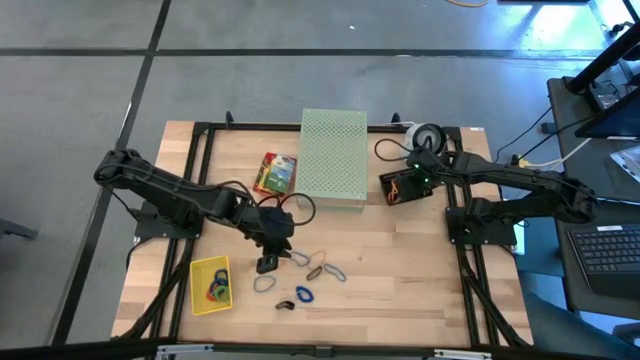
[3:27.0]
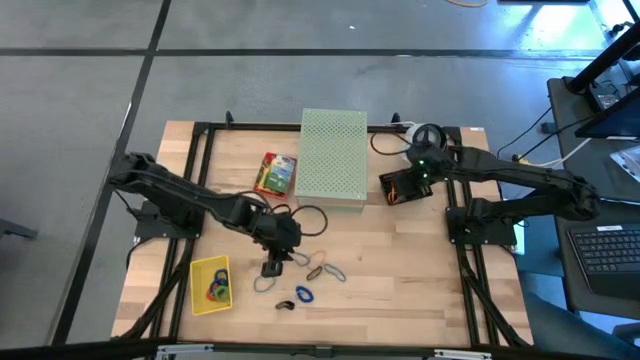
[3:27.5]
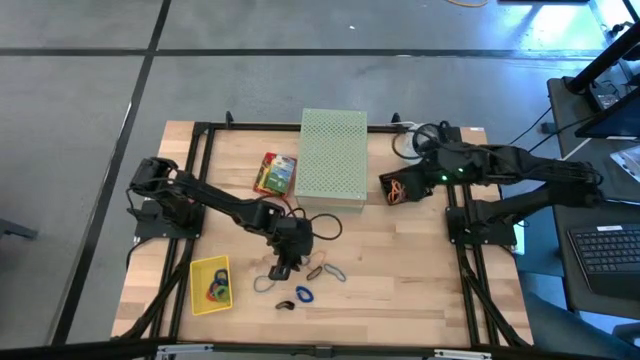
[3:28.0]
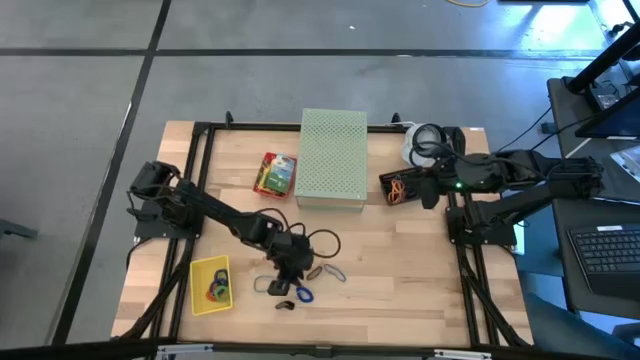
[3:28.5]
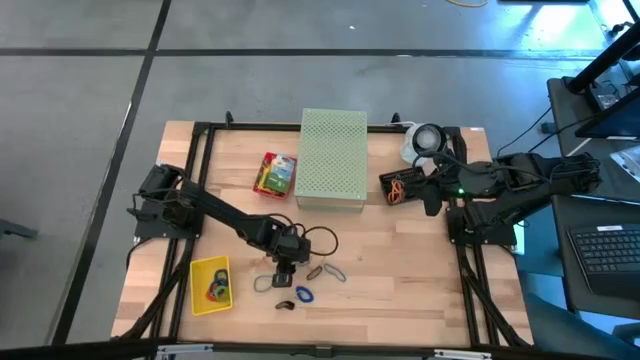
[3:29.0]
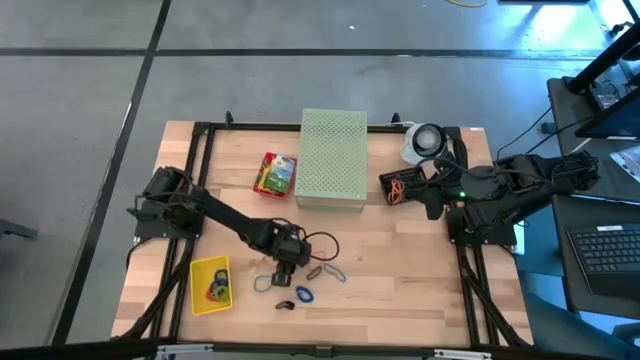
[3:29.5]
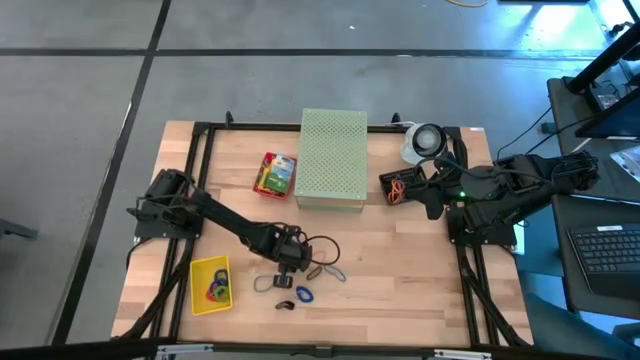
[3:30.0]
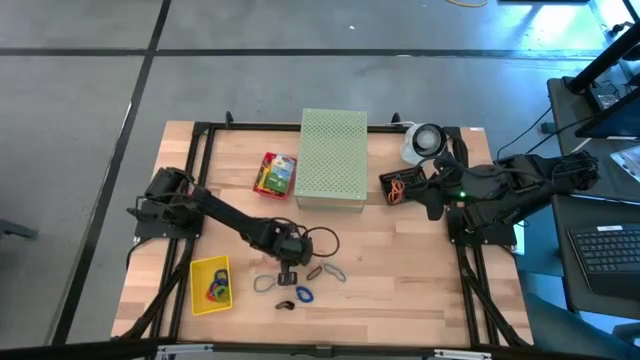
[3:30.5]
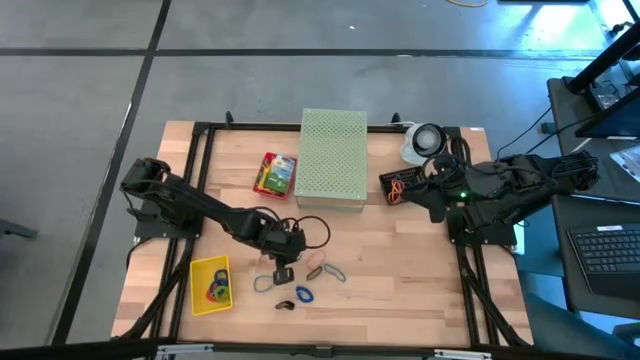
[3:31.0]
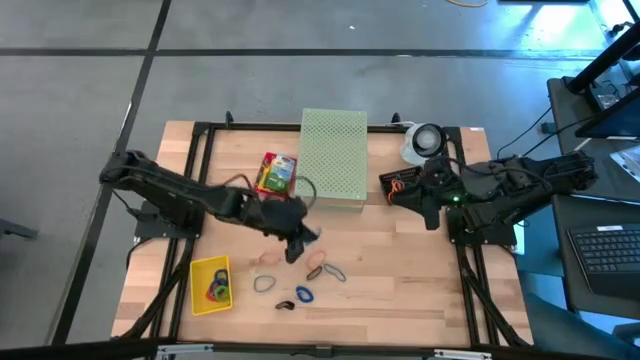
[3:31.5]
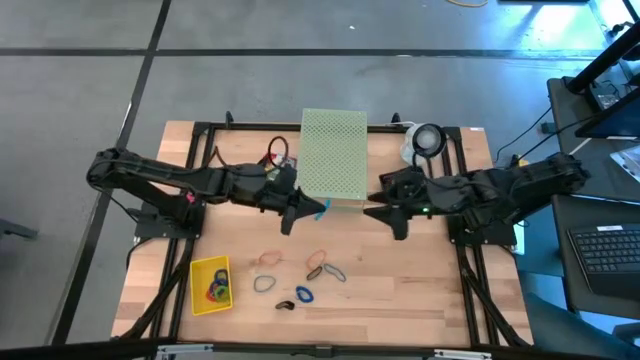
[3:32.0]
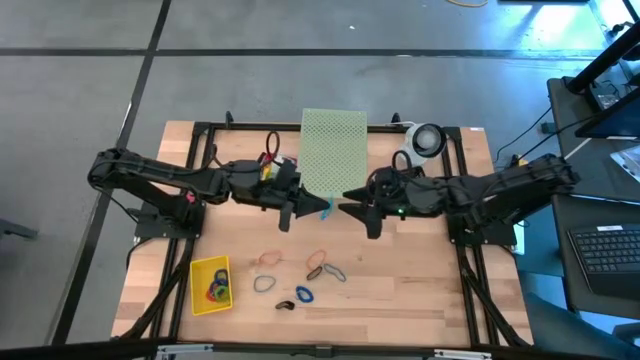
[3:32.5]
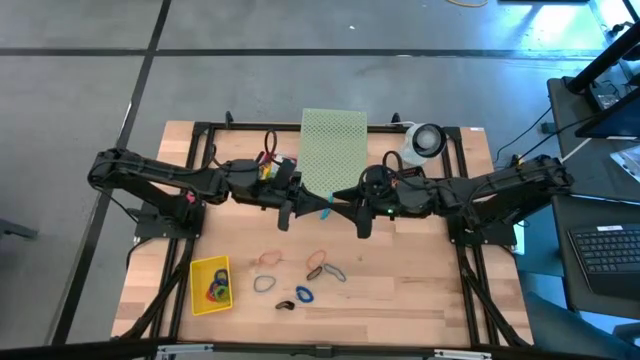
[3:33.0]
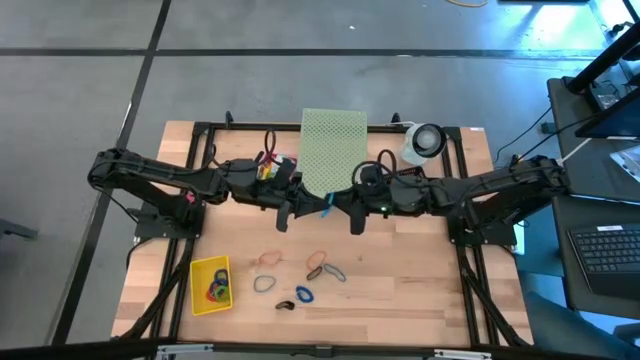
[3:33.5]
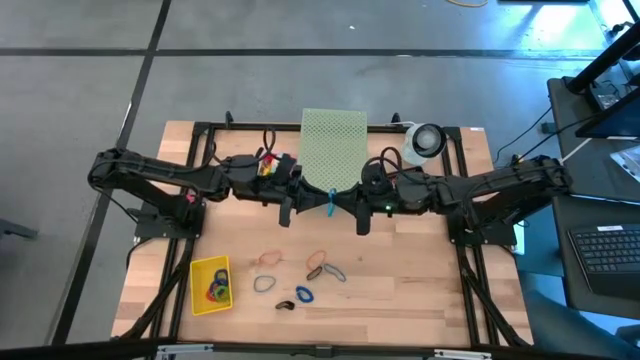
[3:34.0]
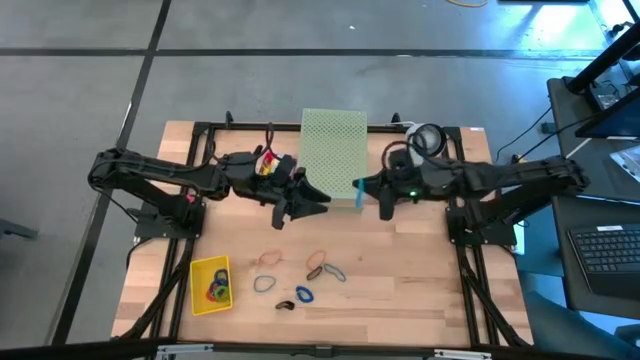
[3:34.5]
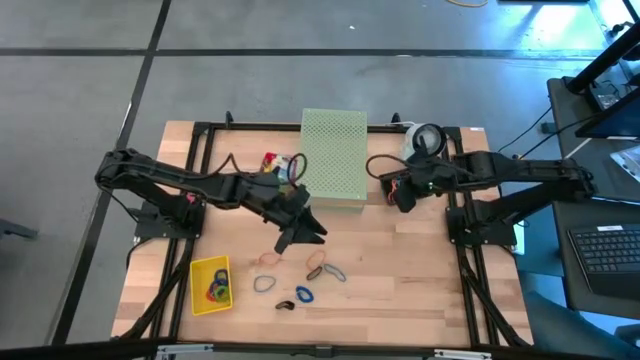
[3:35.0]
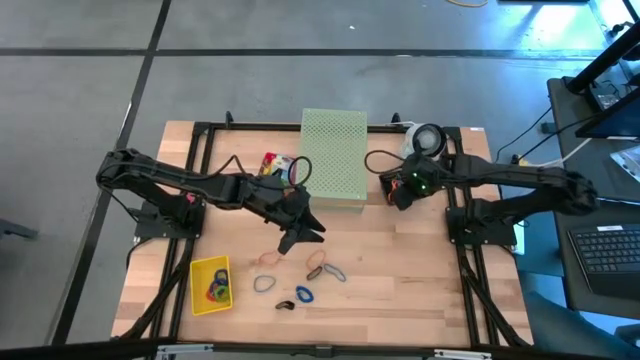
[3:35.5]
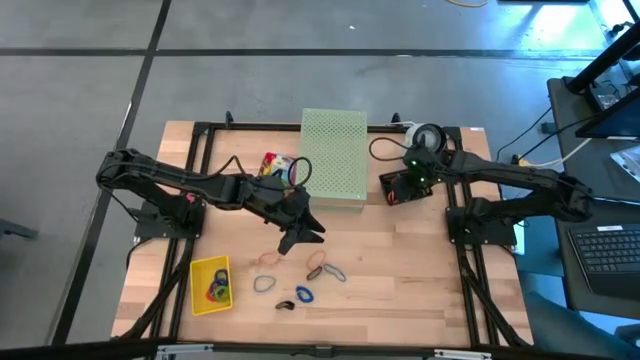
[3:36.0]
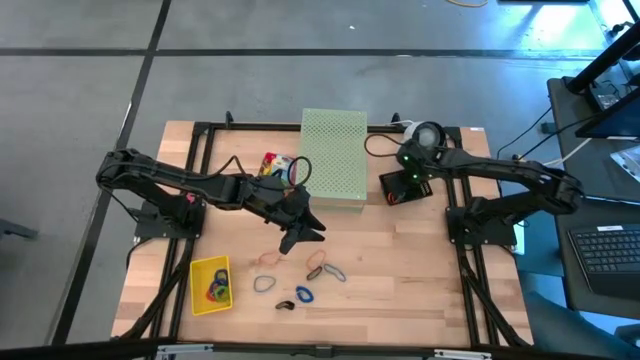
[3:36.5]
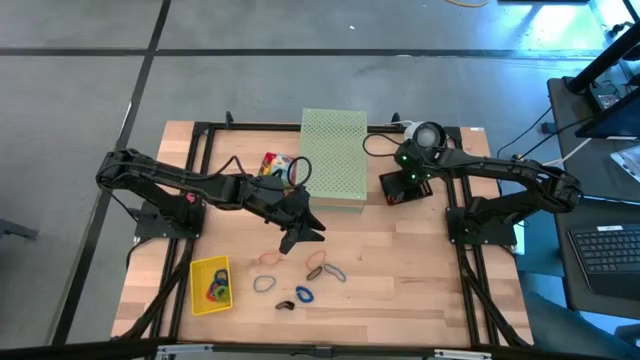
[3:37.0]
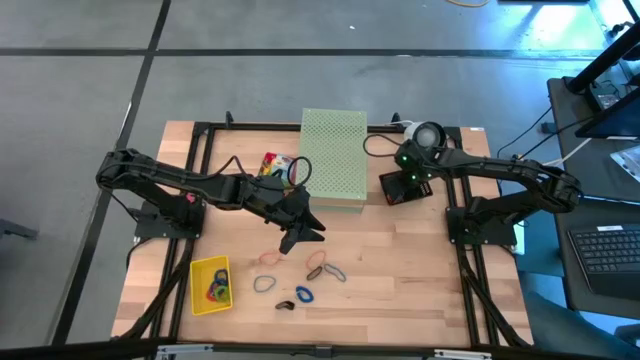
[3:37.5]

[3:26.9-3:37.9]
Task: Pick & Place Office Desk Supplies
Put the blue rubber band into the black bin

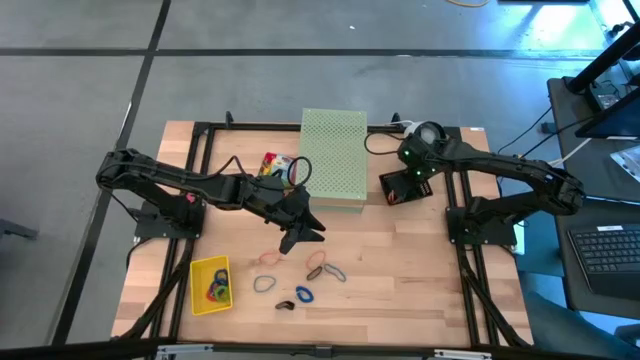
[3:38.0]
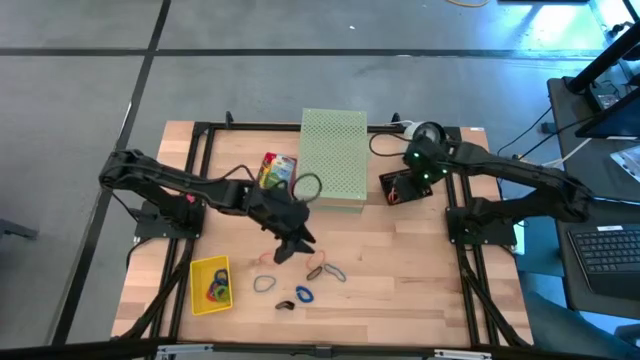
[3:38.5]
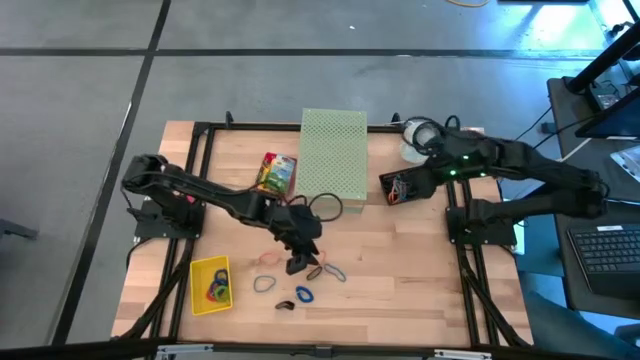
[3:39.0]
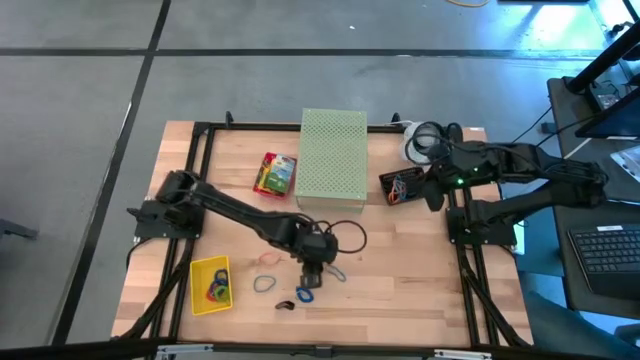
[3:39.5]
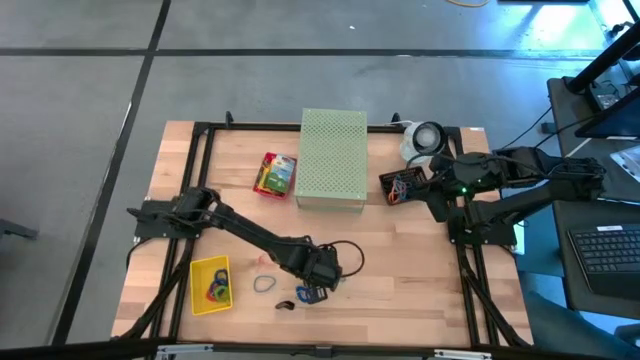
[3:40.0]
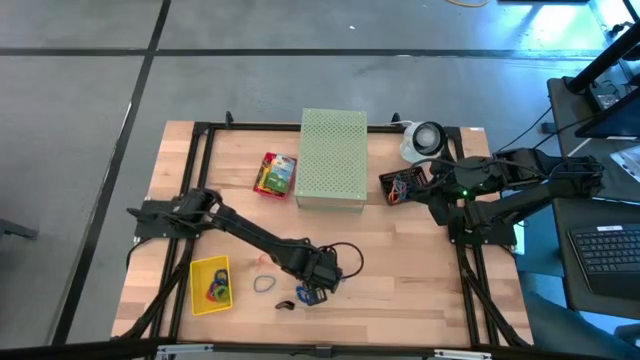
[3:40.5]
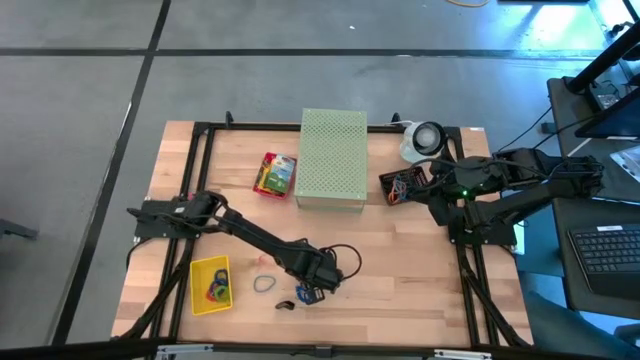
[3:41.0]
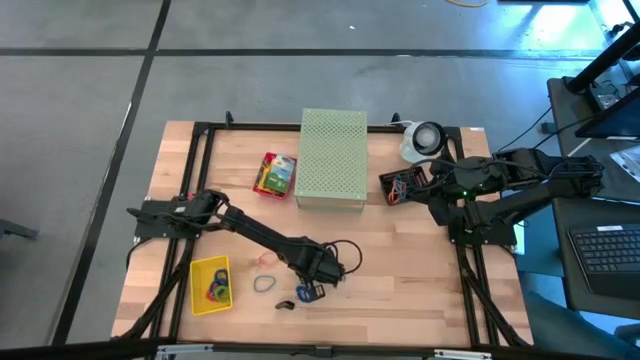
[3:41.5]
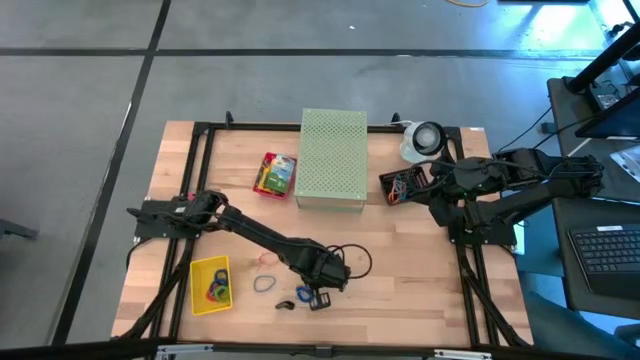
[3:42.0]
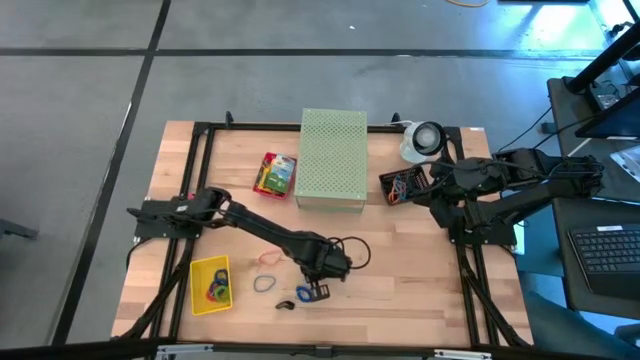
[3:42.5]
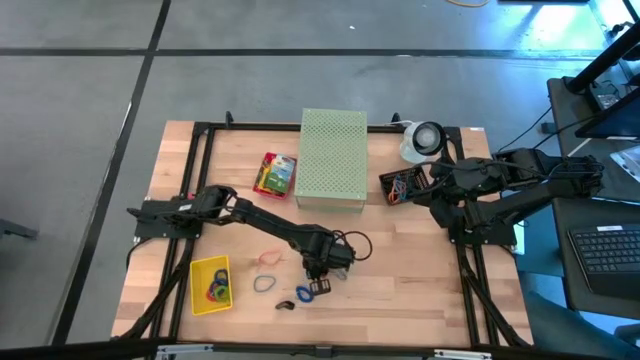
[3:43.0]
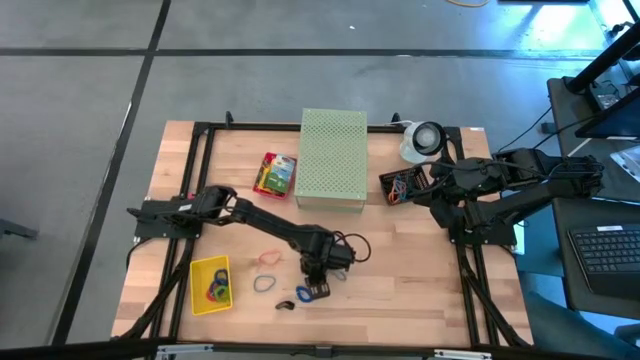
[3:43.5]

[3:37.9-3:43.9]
Put the black rubber band into the black bin
